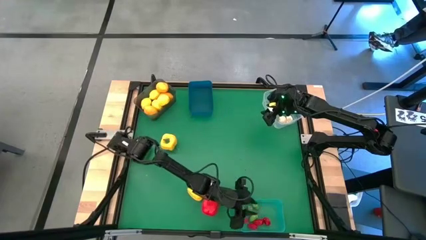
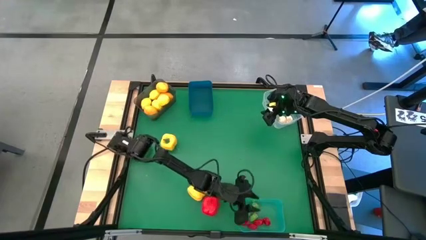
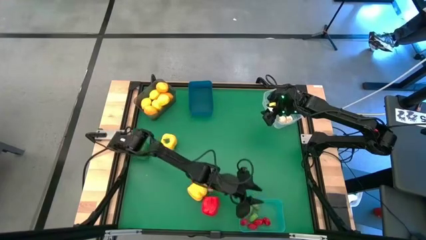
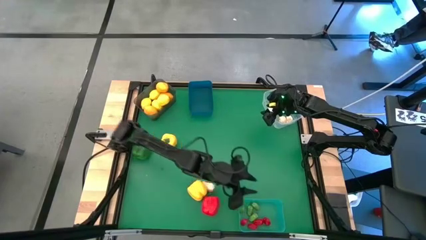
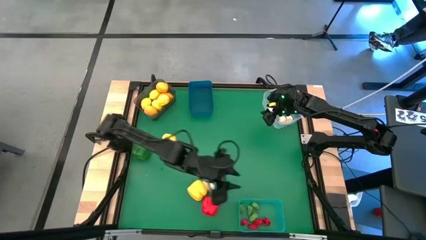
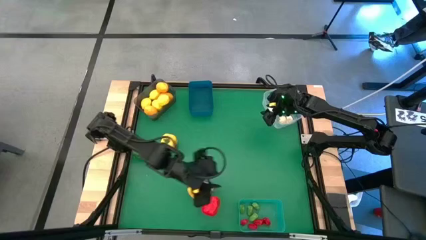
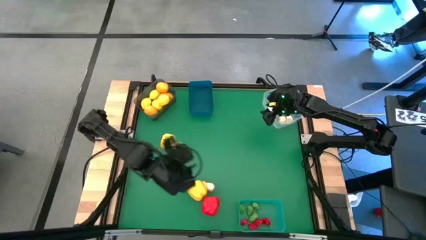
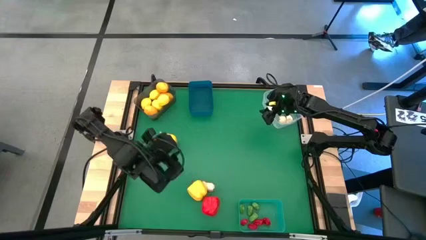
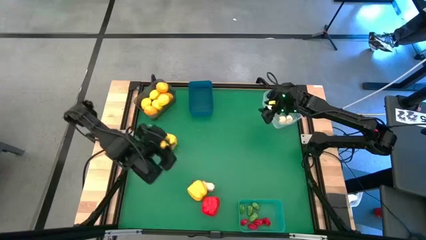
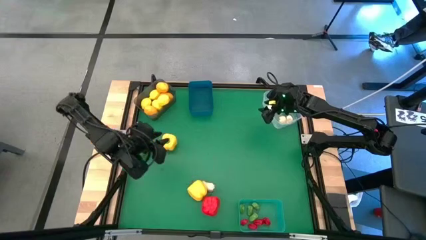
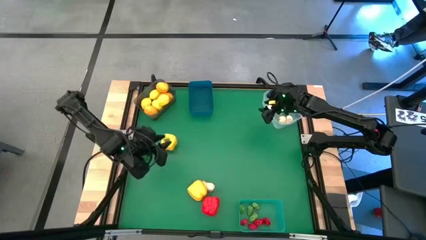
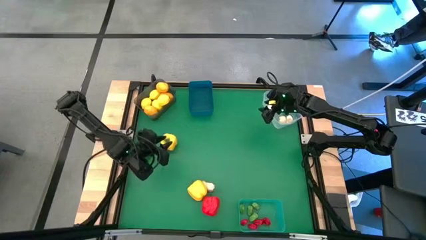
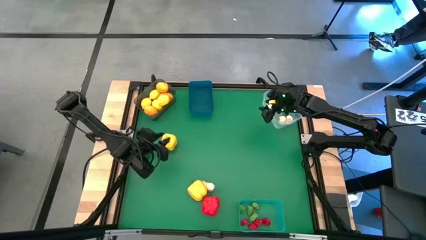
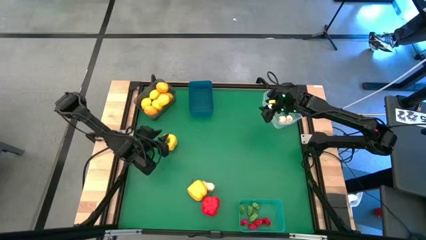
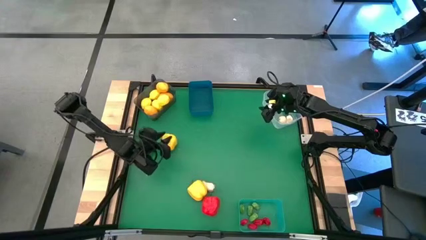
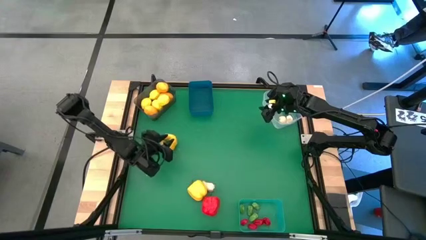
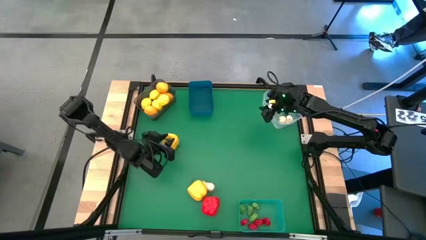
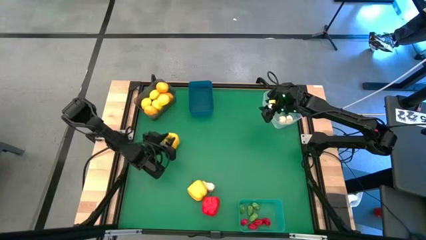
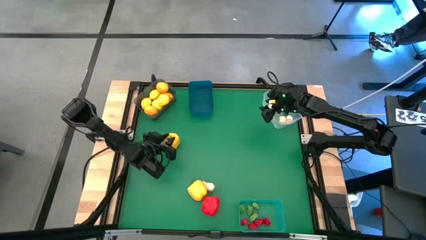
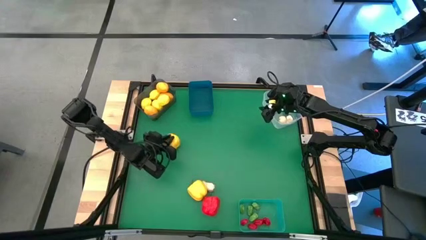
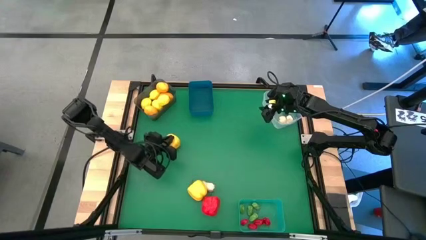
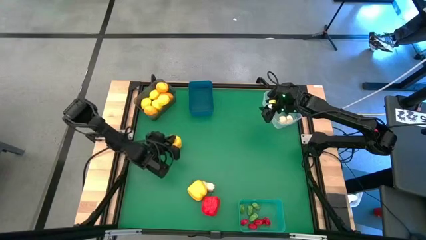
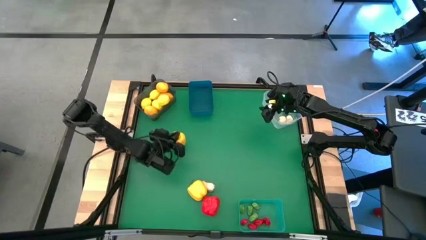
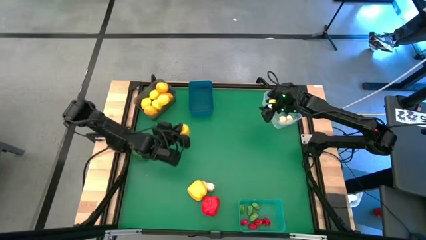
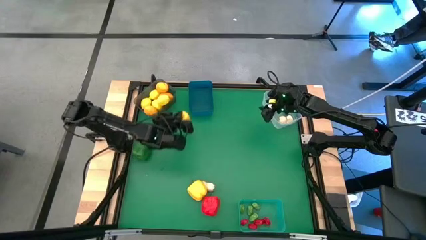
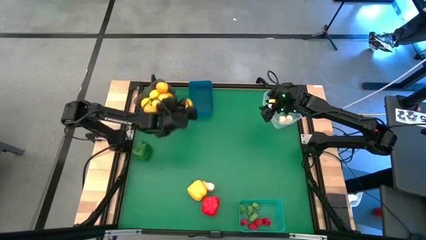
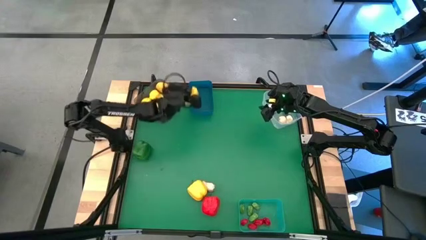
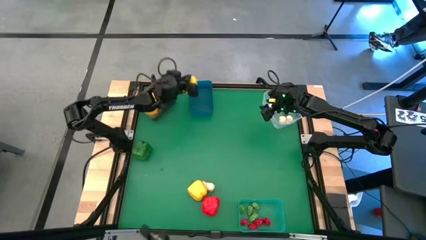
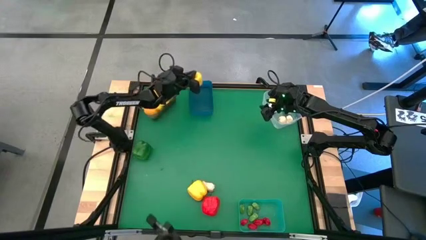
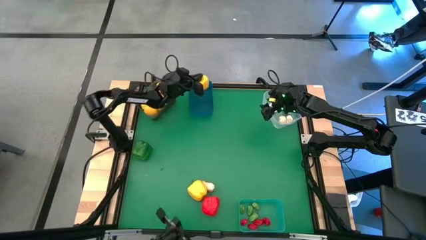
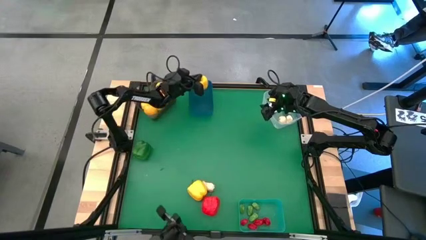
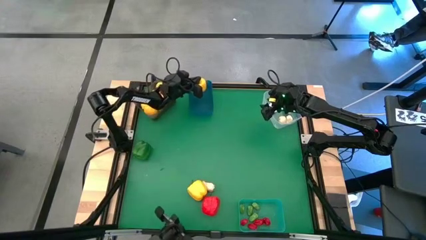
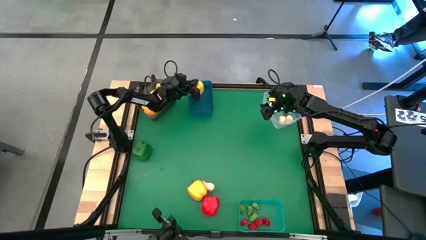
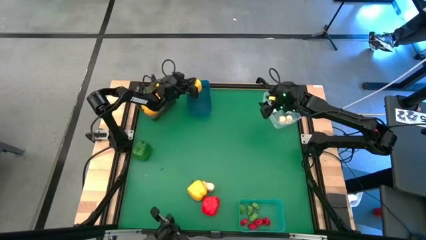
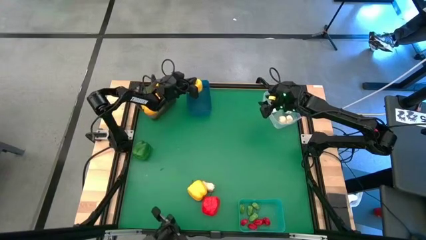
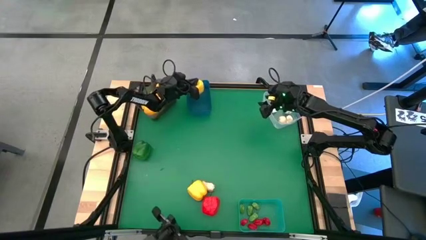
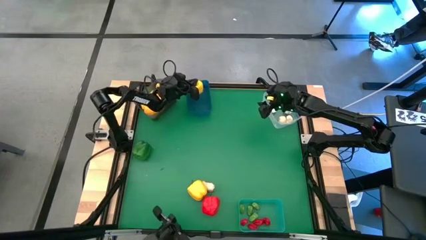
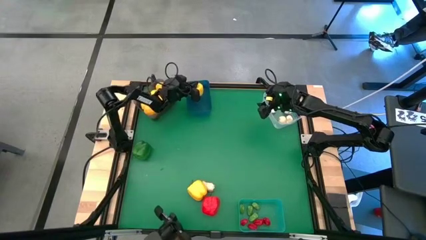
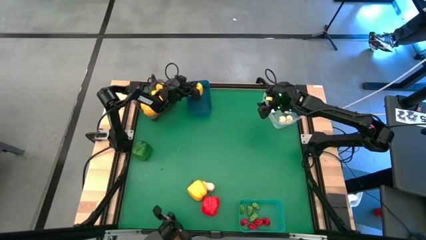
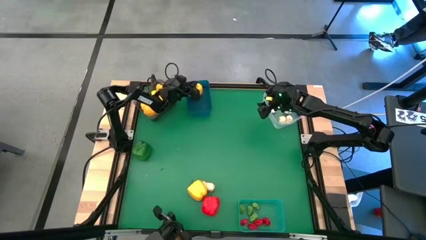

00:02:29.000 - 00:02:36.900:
Task: Sort produce into baskets
Put the top yellow bell pepper into the blue bin

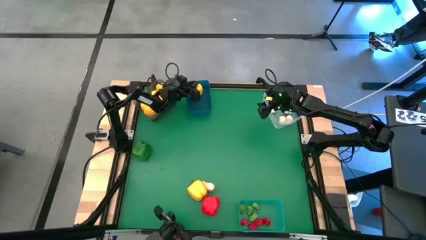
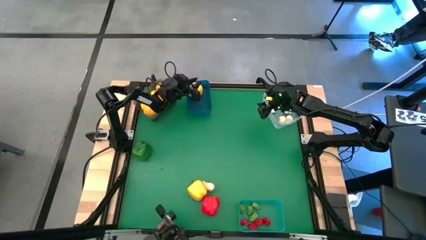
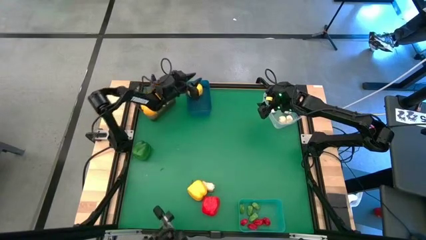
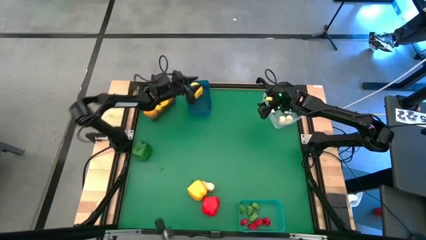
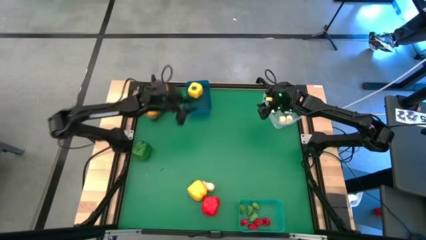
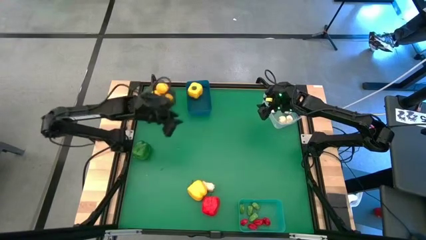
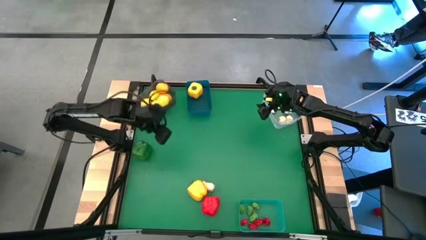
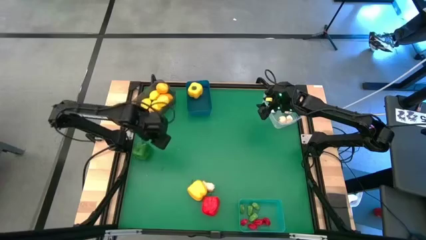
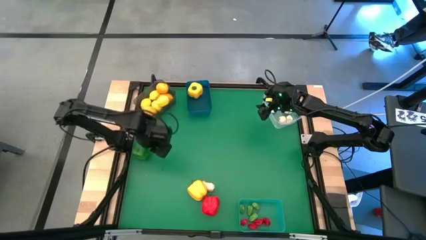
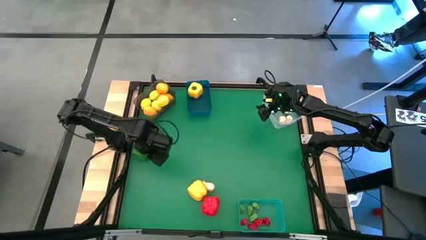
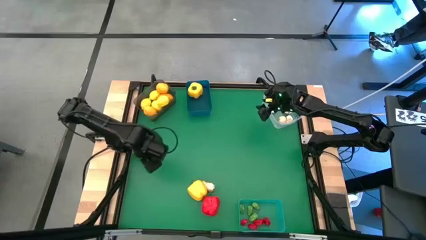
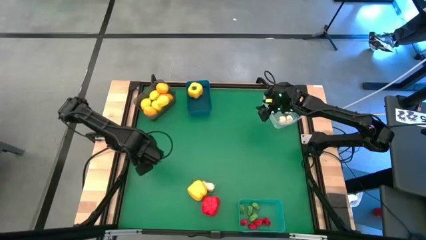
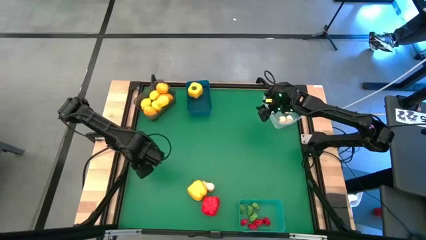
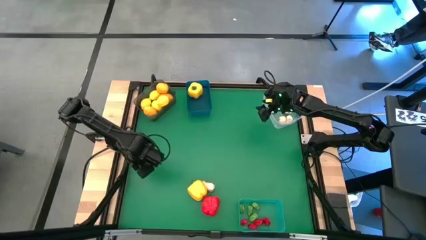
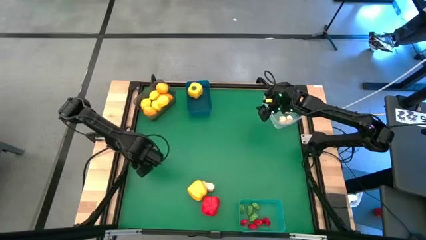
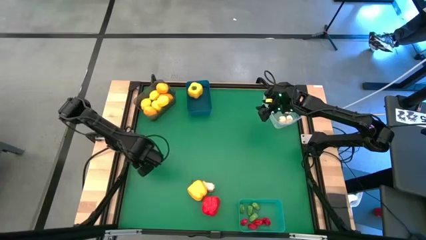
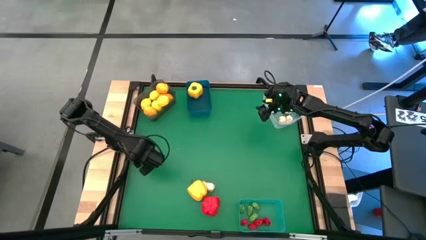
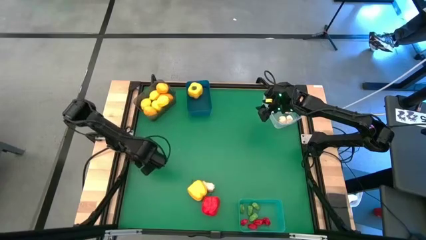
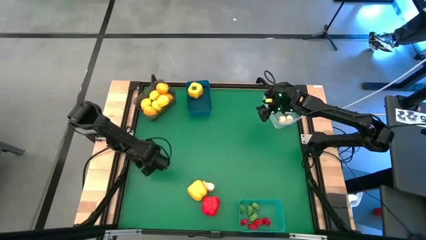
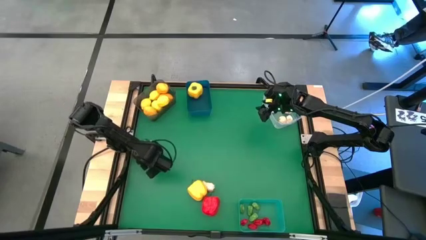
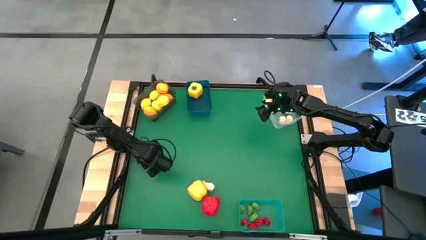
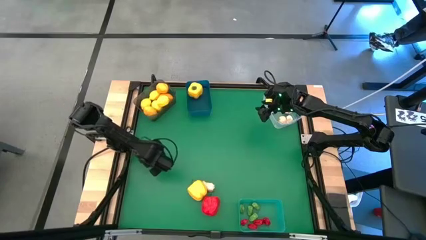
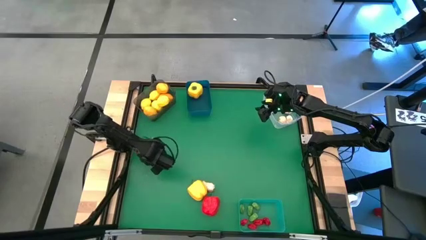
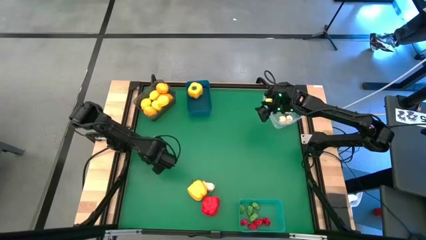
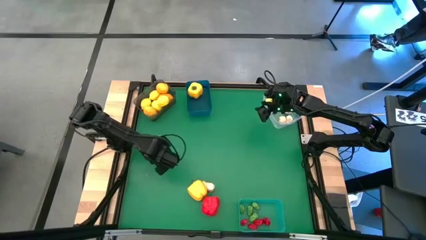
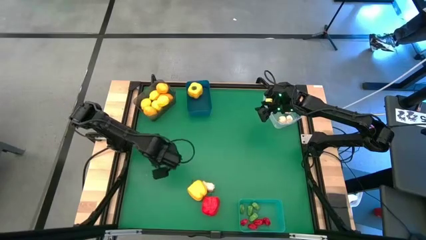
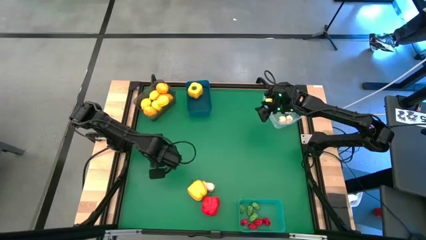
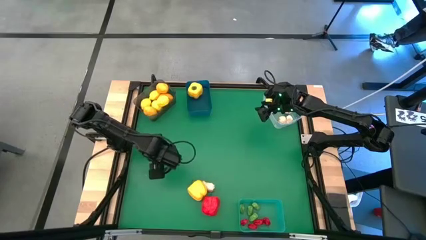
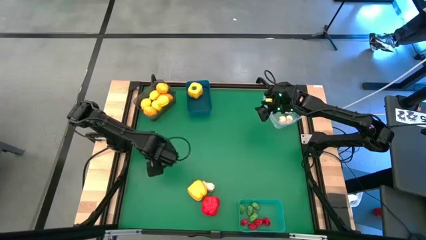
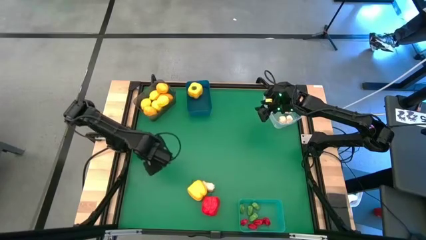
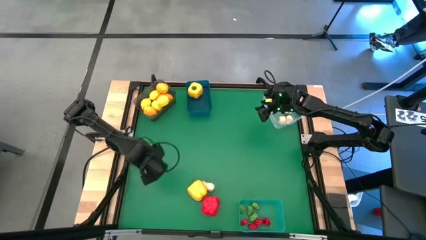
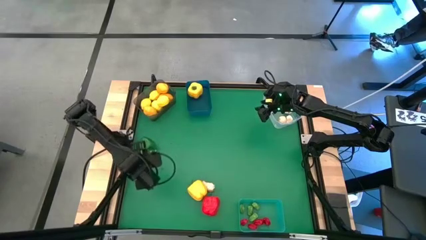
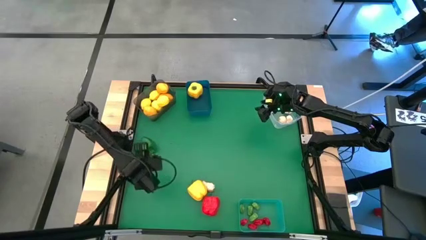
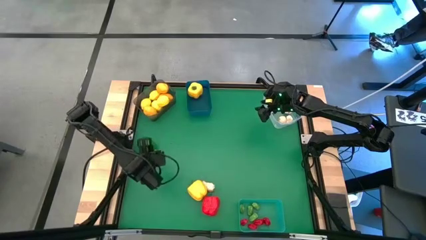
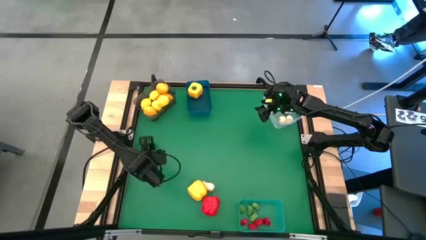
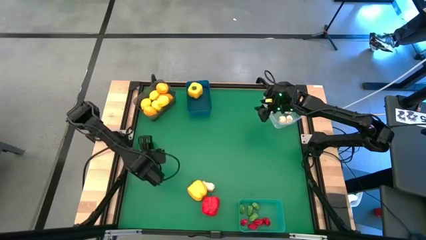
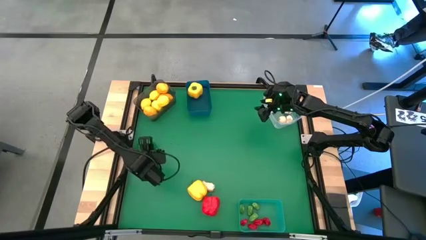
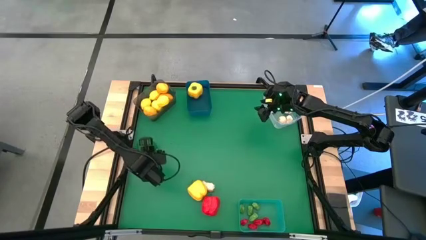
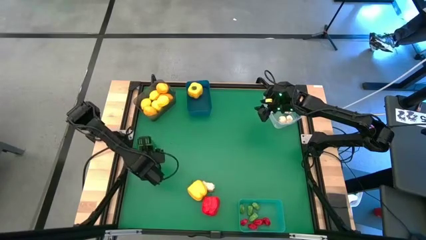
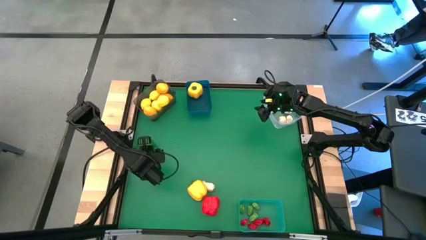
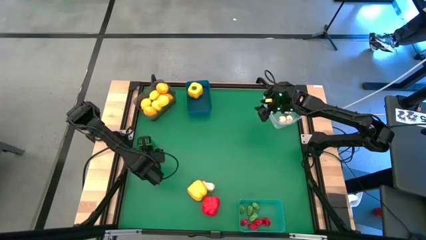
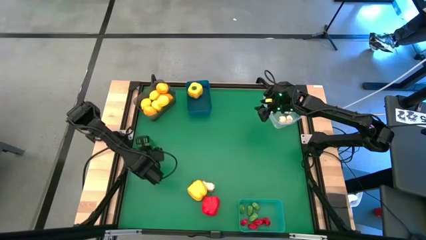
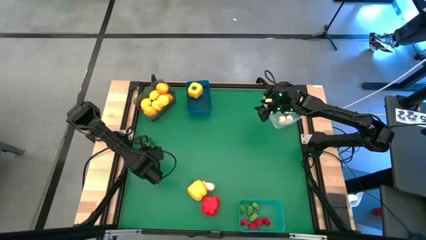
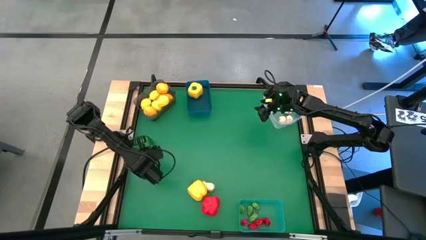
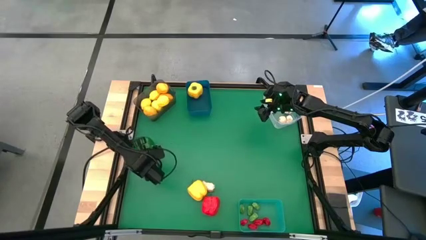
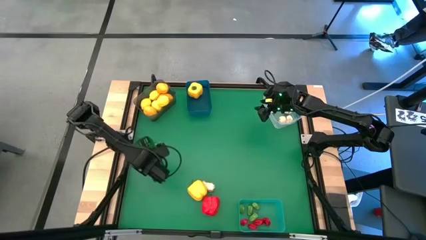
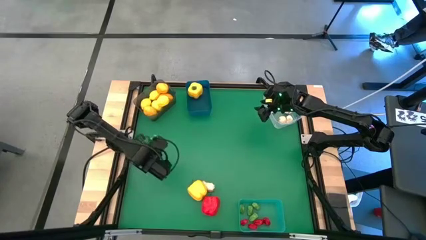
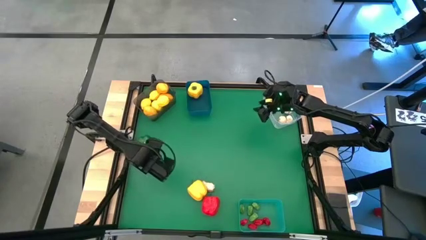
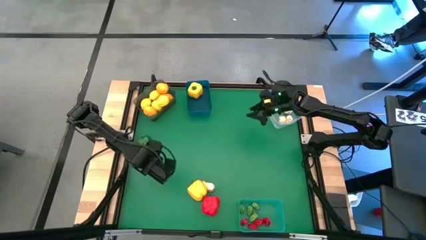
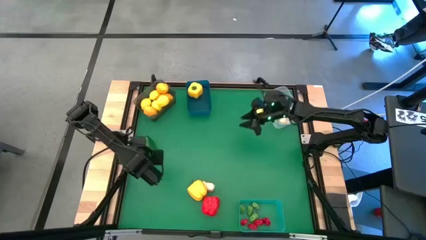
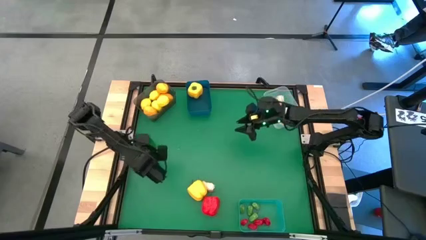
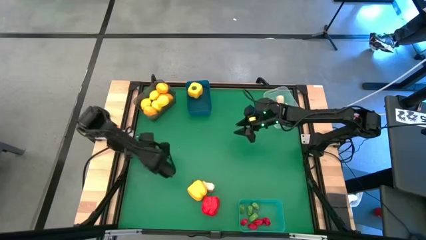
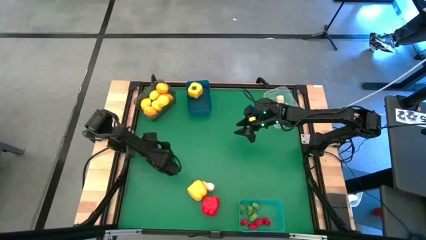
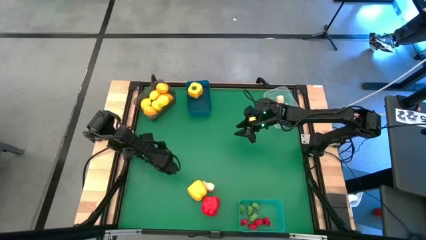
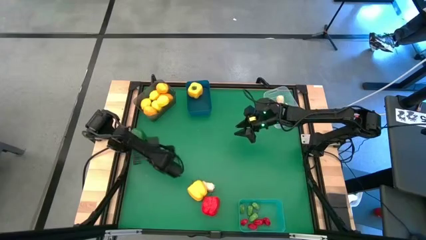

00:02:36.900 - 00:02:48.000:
Put the green bell pepper into the blue bin
